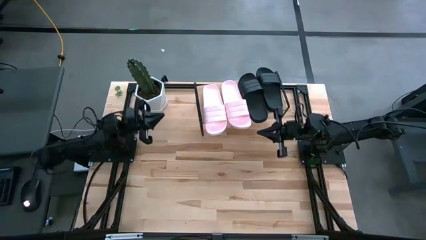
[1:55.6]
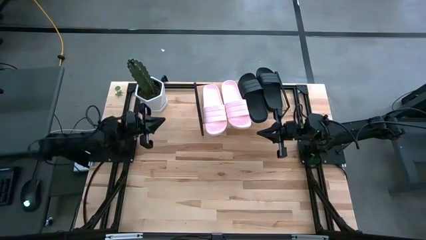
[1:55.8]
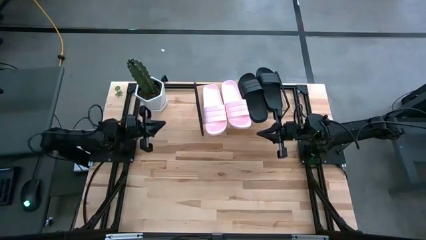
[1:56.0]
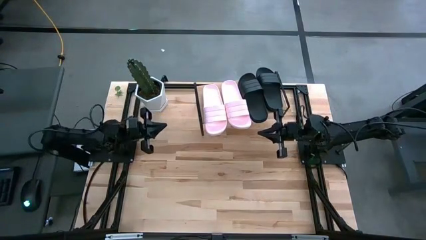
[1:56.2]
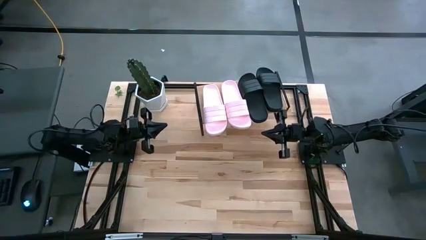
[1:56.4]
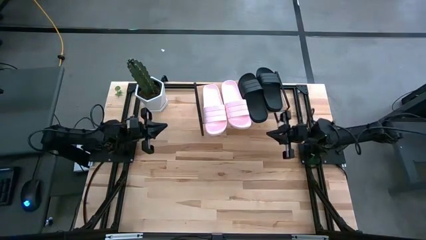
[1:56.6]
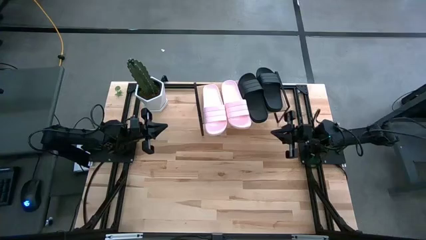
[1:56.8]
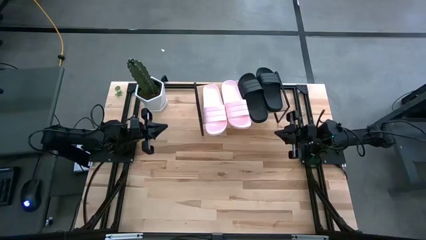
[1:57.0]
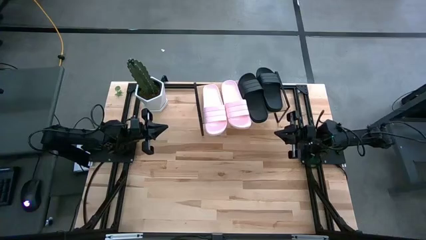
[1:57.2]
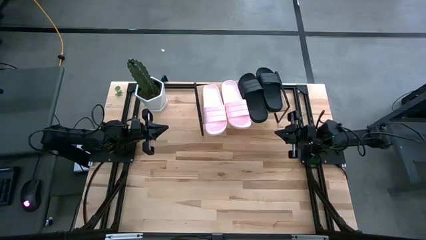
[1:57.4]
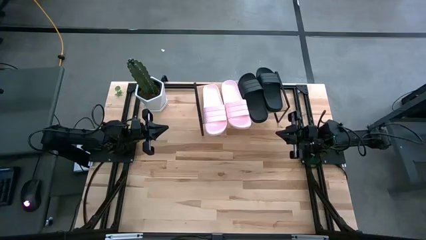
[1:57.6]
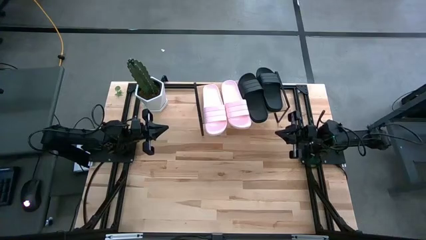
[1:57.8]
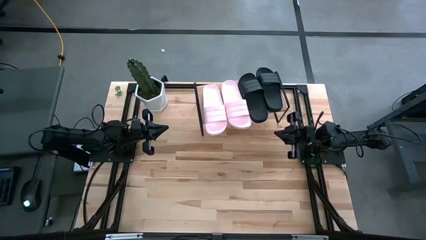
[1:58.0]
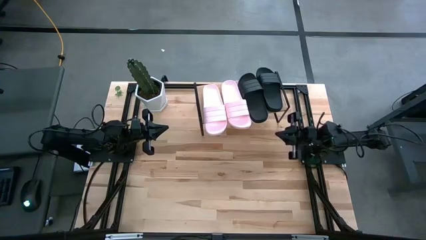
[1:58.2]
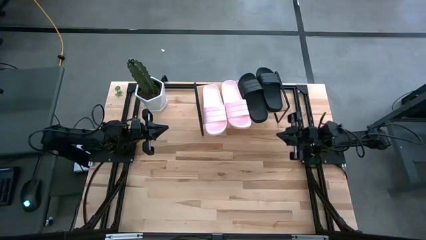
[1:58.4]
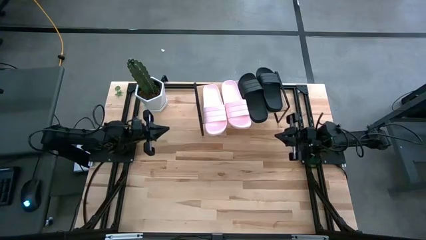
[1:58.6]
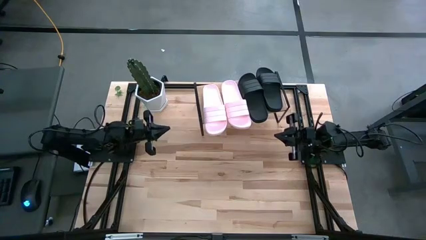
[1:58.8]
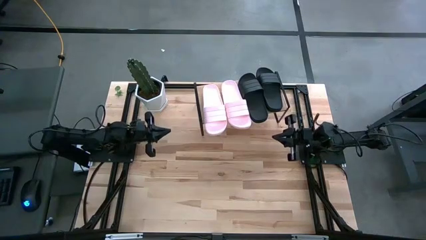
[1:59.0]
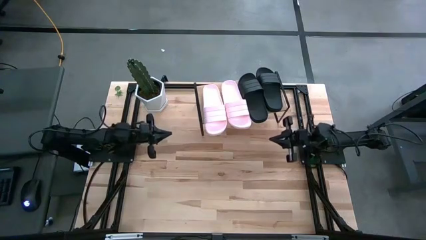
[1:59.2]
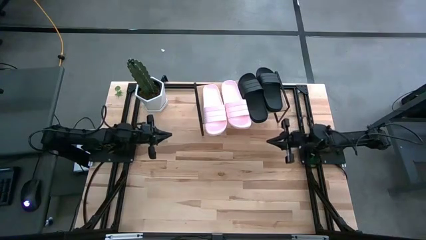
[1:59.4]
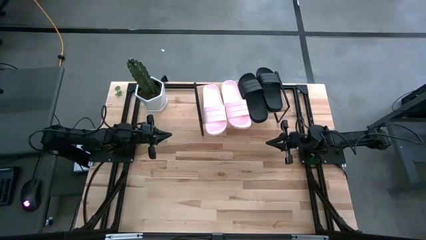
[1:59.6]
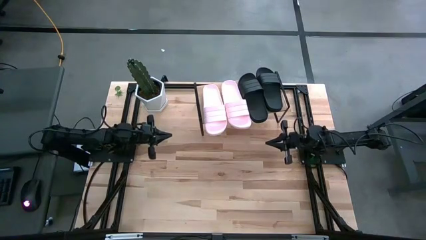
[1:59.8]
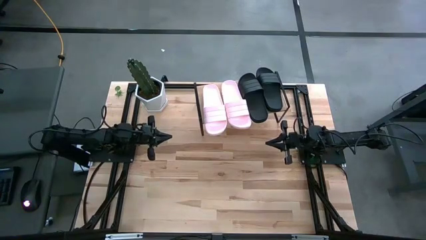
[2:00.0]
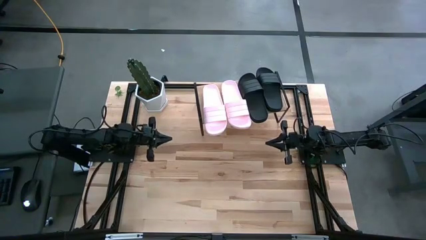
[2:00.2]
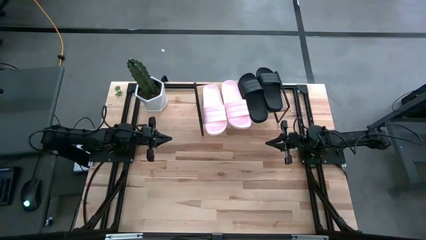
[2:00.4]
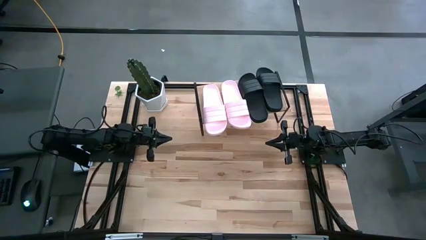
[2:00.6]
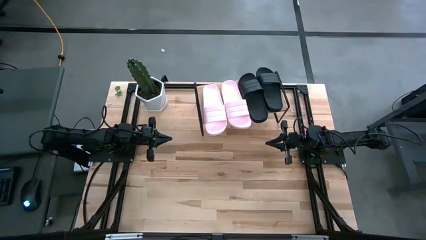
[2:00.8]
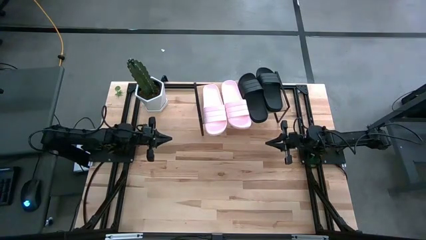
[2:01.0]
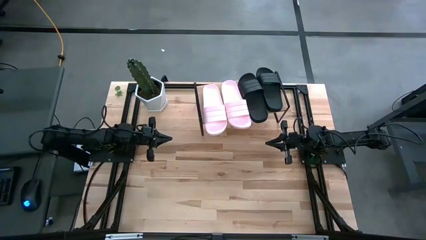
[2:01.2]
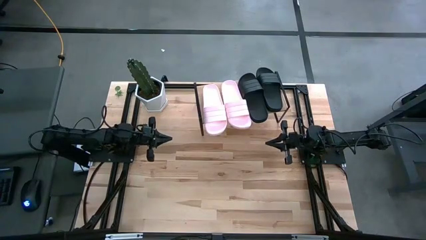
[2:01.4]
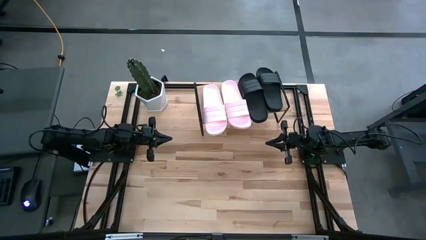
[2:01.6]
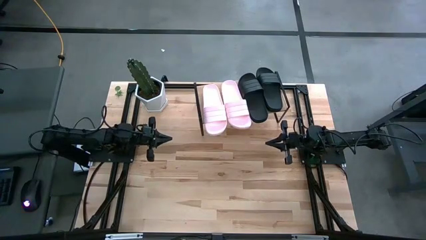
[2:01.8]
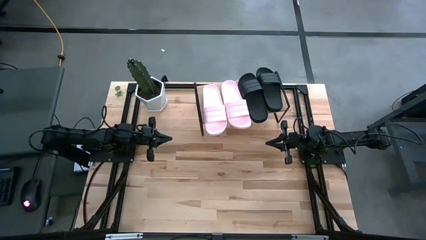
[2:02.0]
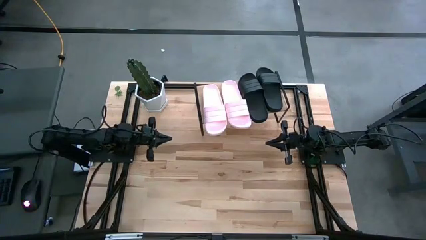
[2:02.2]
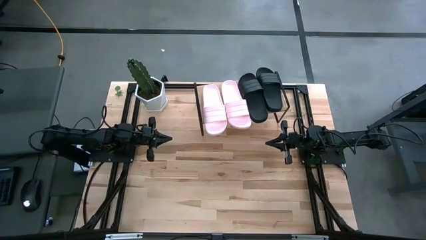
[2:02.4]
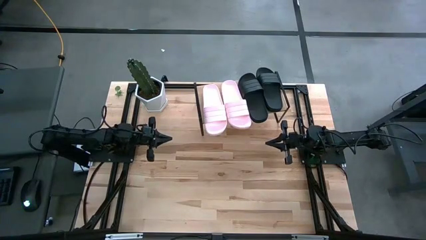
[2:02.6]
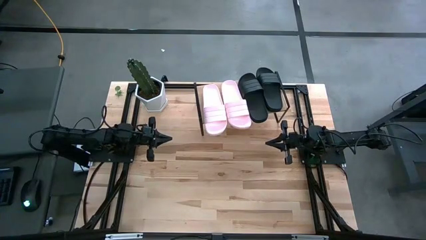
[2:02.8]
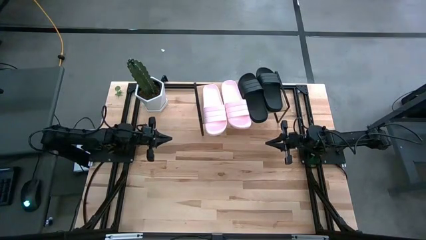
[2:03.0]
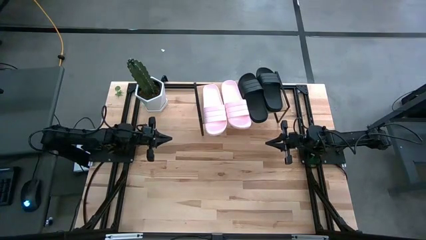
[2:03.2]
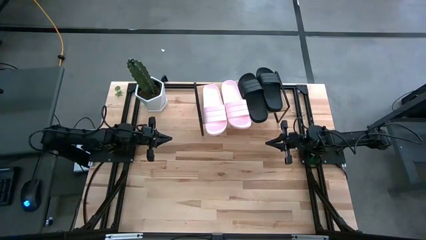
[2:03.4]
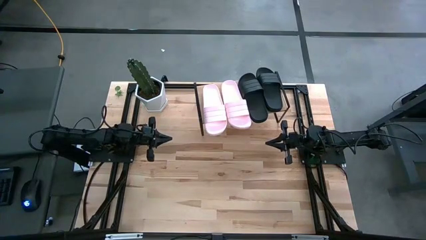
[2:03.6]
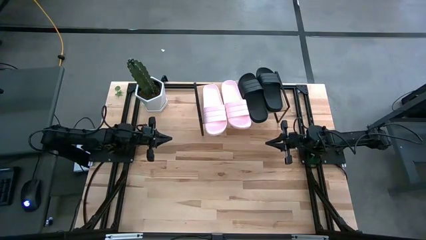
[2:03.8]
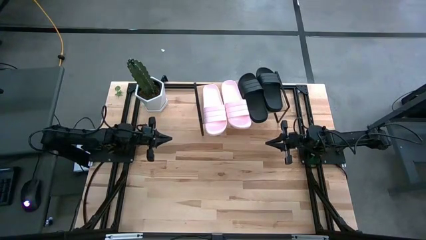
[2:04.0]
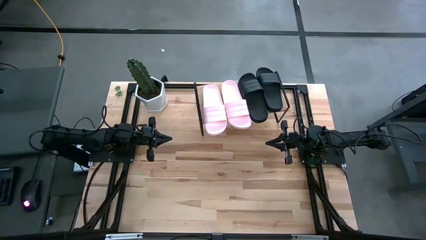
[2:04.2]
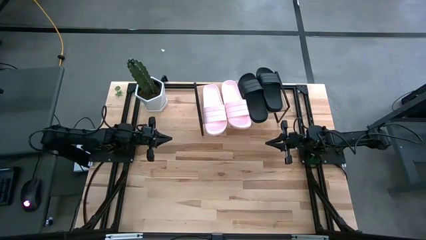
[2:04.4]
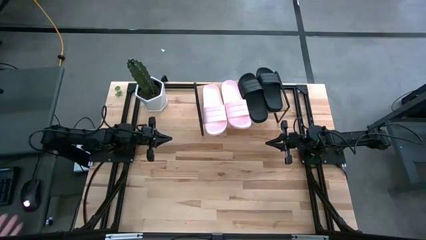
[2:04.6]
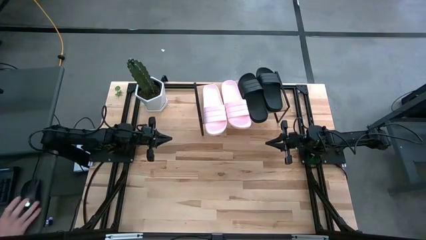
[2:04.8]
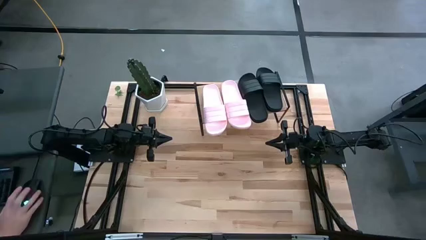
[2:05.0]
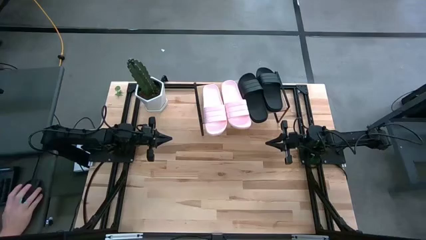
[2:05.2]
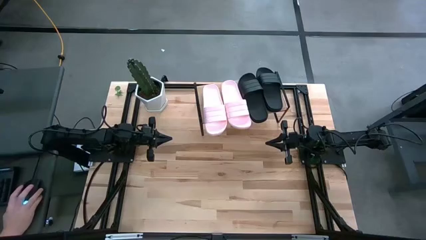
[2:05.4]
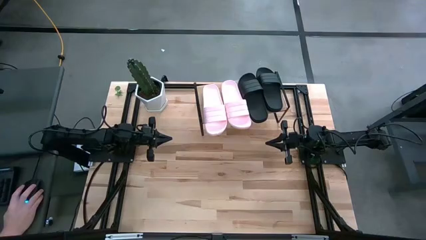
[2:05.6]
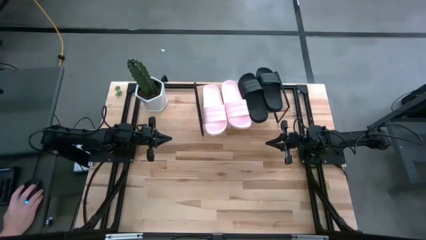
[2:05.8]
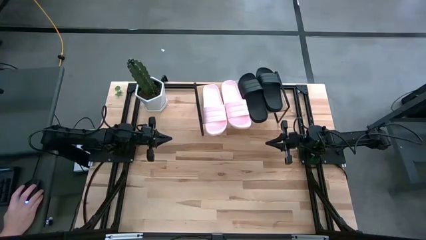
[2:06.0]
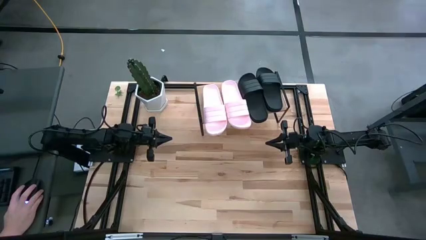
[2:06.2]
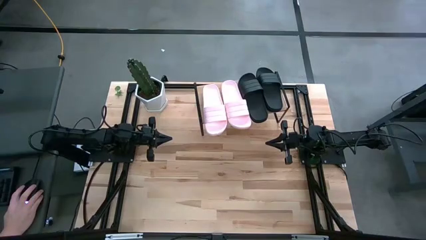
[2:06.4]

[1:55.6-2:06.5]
Task: Pick and place slides into the shelf
Return to Home Position
